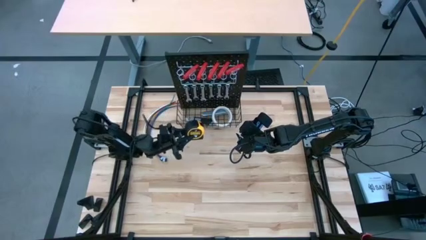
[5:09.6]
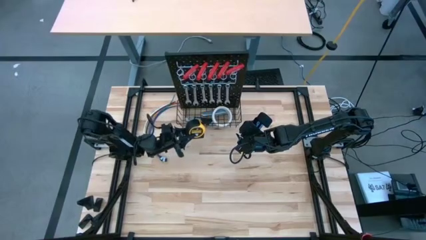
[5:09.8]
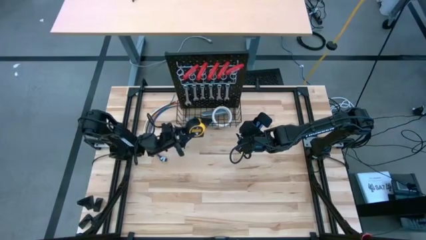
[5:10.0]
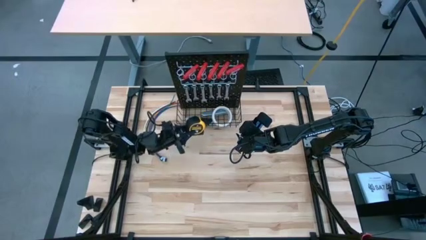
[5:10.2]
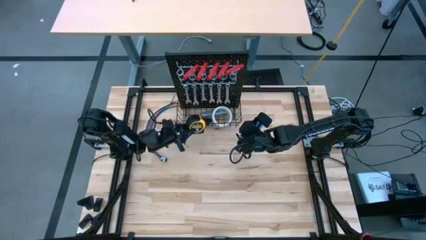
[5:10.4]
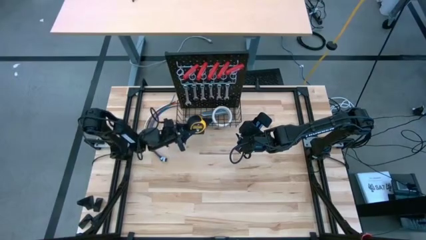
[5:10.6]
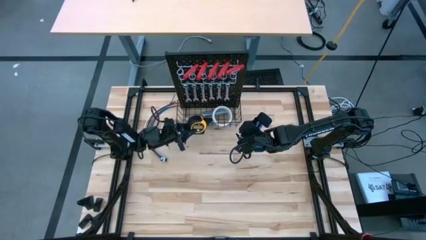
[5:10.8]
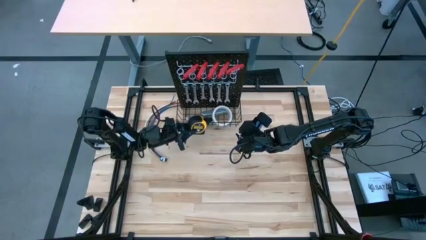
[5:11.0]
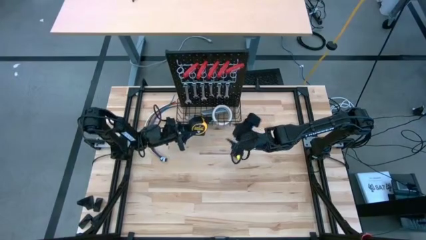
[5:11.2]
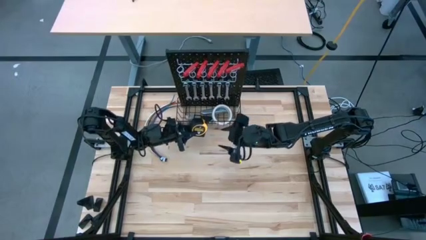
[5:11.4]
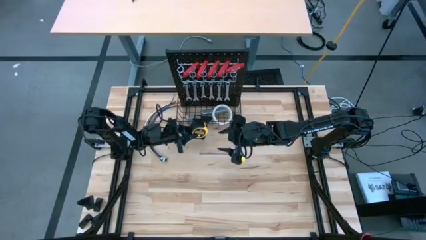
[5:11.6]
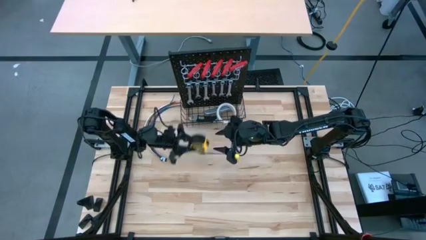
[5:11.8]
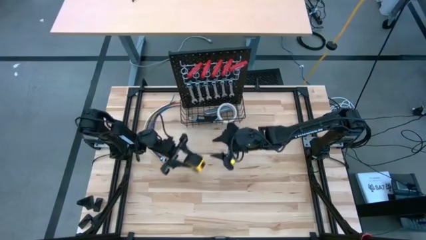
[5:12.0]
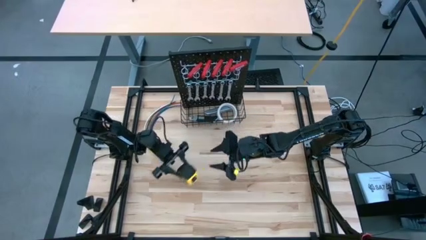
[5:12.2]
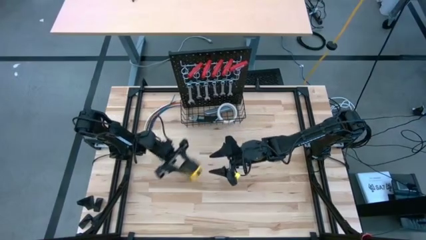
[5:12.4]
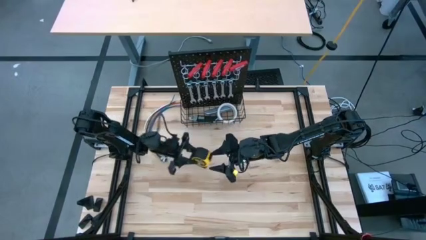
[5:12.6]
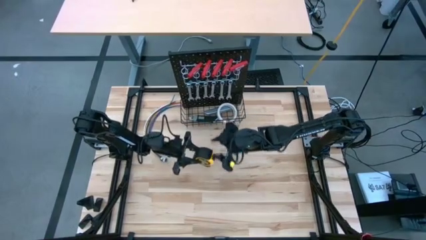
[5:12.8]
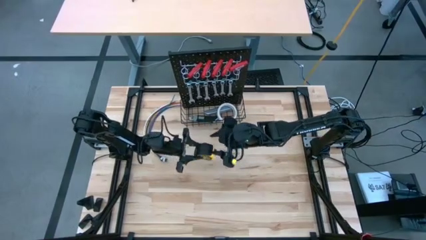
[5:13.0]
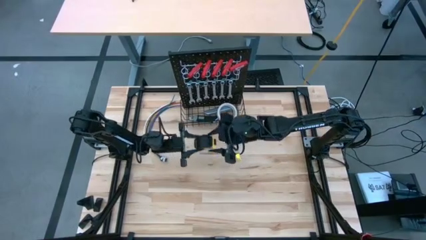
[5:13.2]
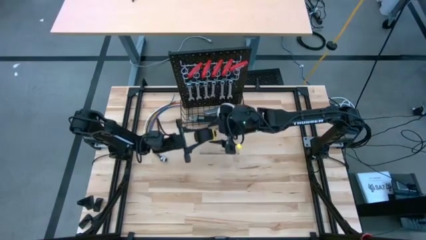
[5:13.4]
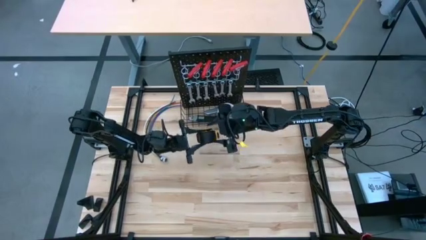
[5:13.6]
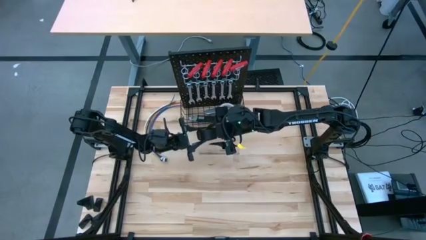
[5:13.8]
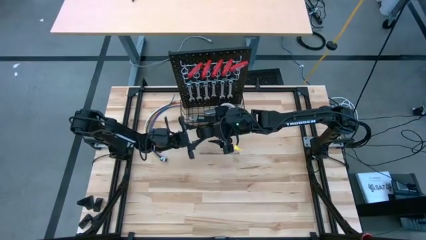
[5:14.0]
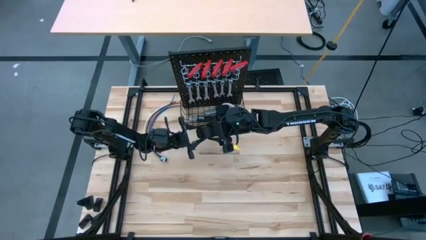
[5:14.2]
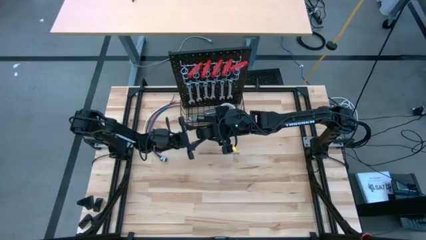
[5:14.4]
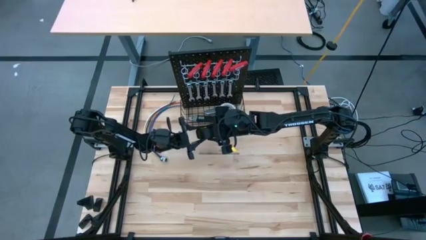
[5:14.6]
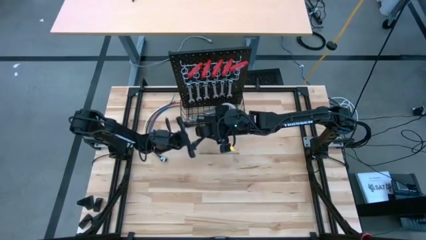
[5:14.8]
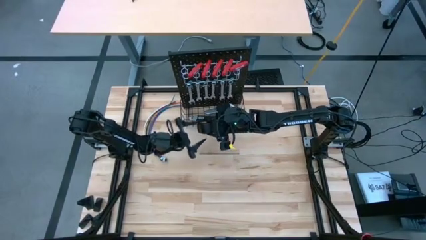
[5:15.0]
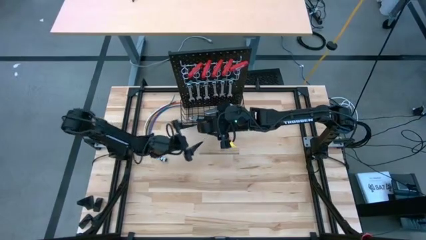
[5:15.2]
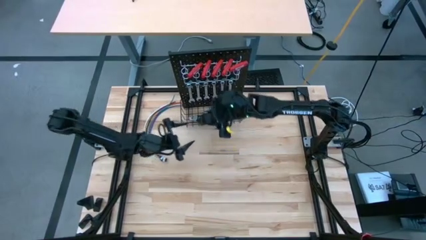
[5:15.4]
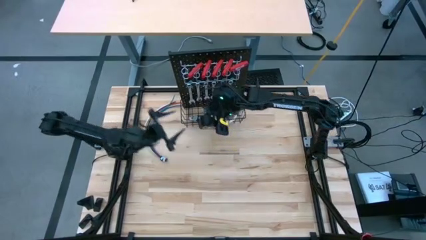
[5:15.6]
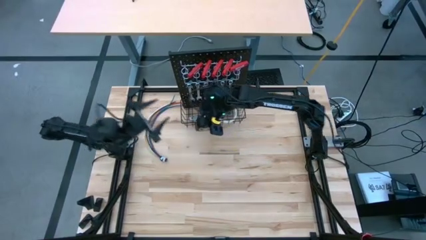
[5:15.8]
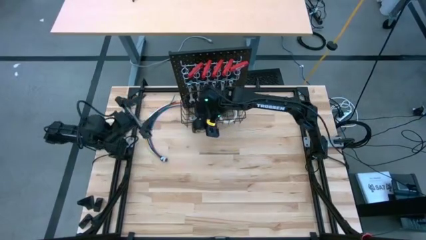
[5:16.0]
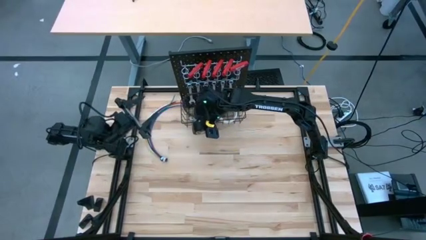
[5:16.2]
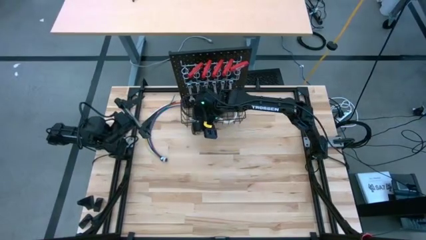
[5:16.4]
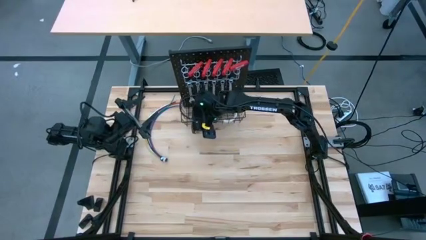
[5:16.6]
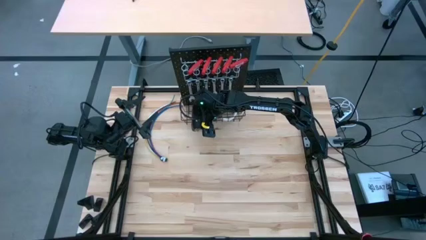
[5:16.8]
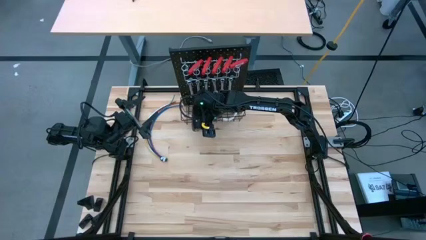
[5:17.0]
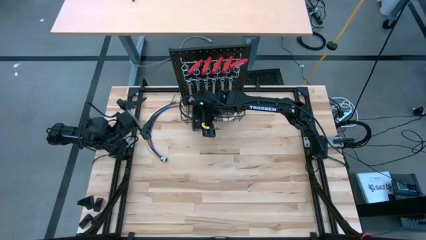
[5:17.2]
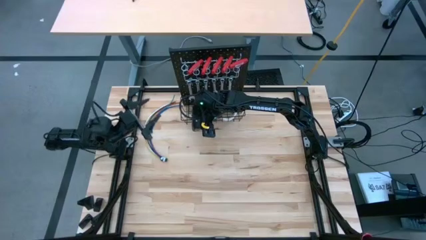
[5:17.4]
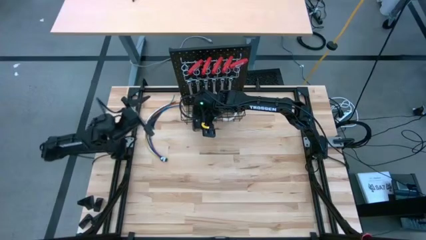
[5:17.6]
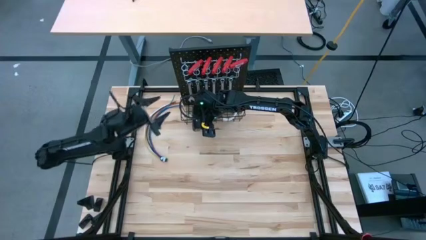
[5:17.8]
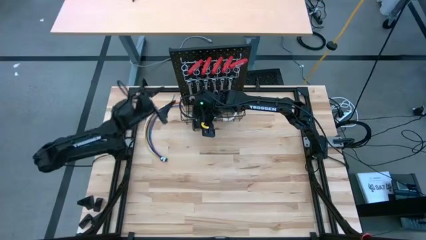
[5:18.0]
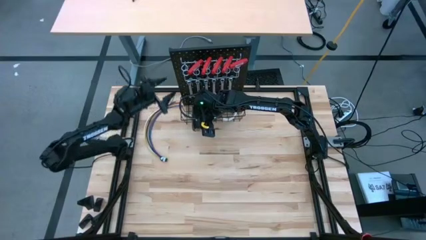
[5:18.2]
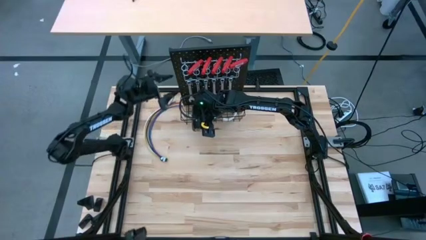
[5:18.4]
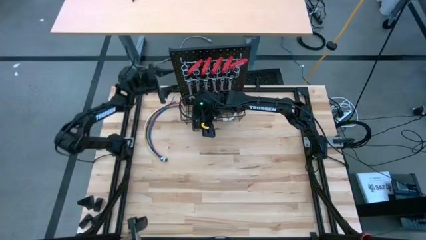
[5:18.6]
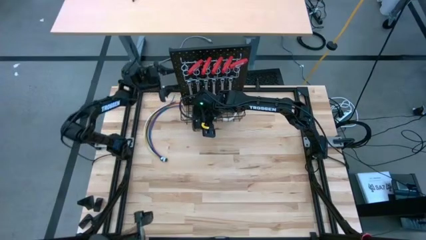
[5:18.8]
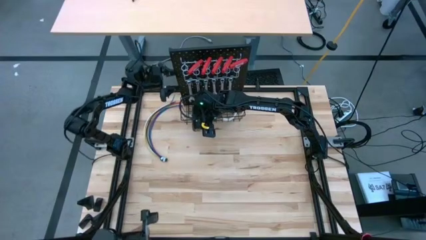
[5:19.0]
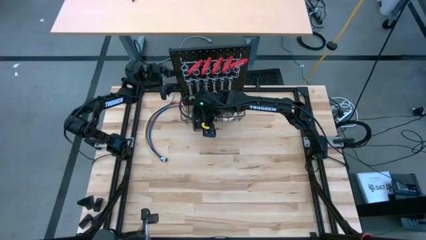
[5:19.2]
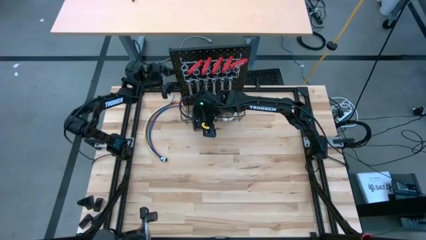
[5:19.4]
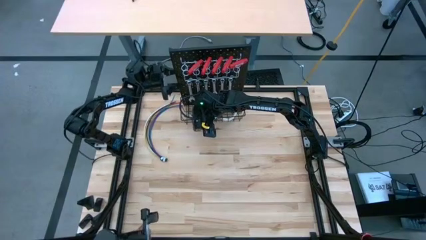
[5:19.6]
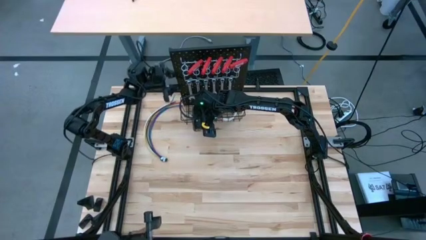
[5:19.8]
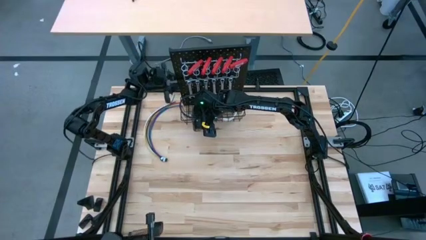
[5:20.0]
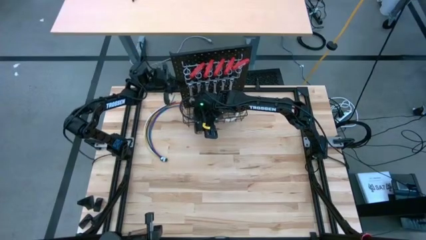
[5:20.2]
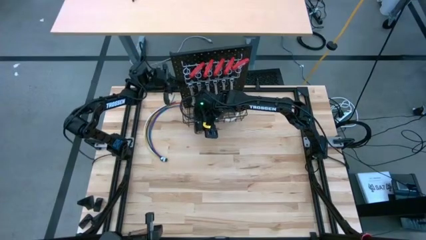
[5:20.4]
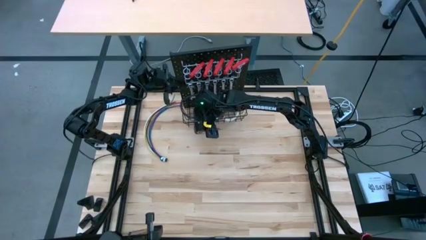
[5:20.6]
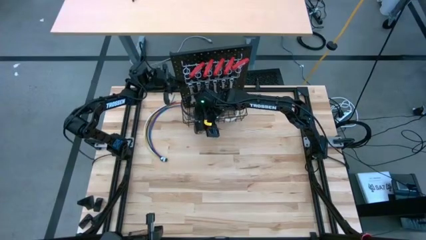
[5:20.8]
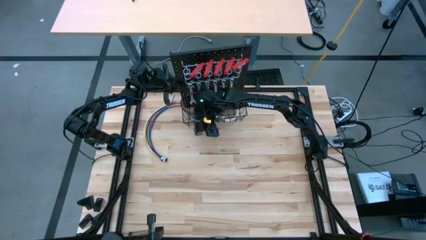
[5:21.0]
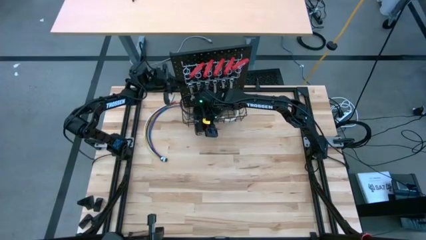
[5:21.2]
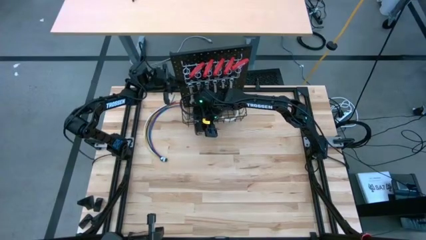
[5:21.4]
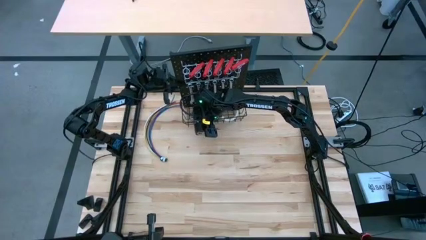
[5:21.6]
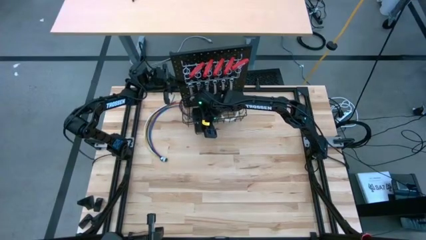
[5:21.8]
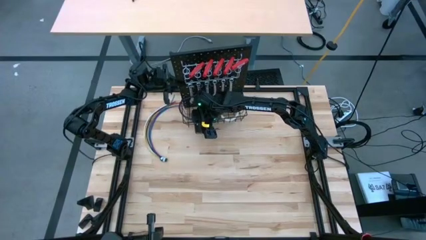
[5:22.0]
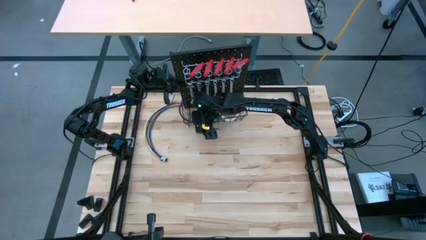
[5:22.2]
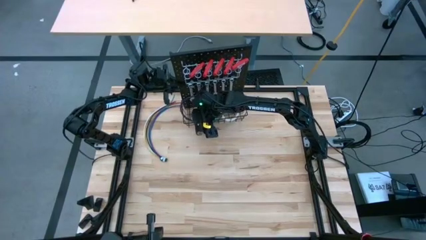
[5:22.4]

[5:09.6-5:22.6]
Task: Hang tools onto peg board
Hang the measuring tape on the peg board

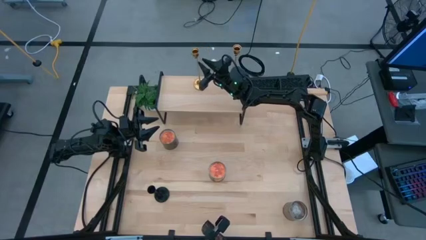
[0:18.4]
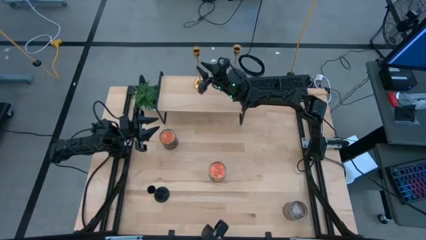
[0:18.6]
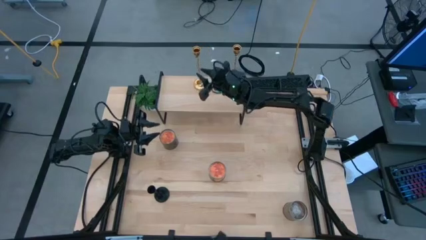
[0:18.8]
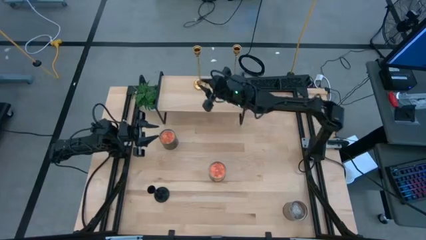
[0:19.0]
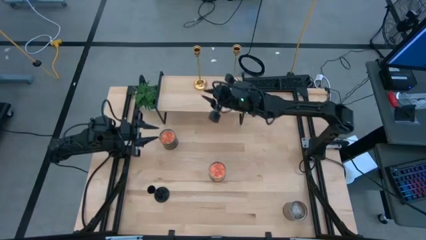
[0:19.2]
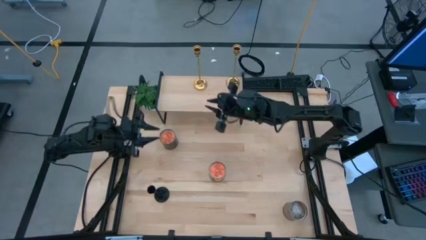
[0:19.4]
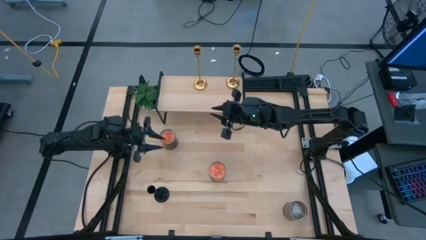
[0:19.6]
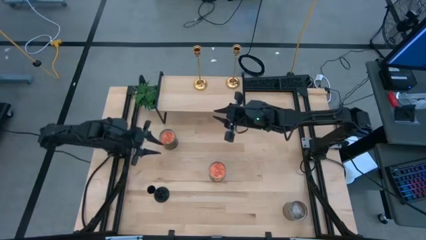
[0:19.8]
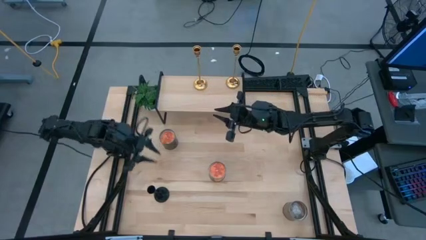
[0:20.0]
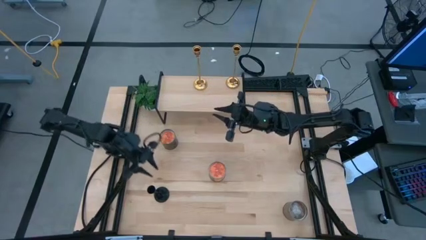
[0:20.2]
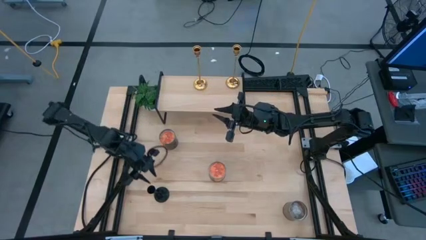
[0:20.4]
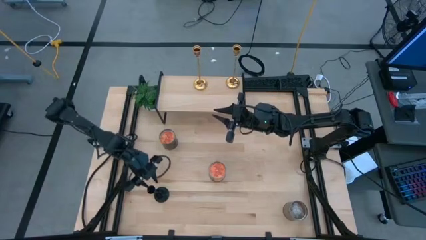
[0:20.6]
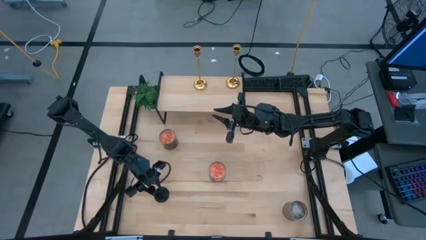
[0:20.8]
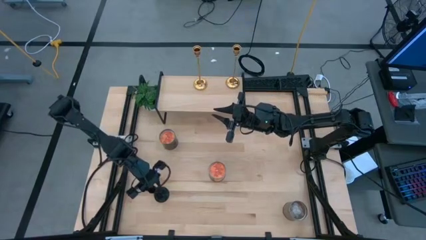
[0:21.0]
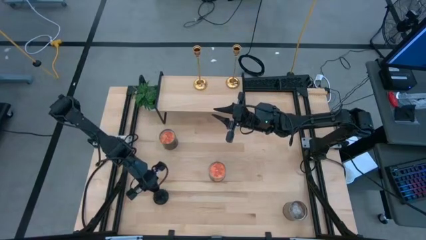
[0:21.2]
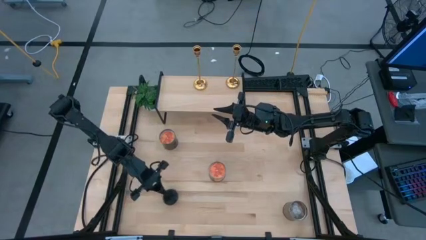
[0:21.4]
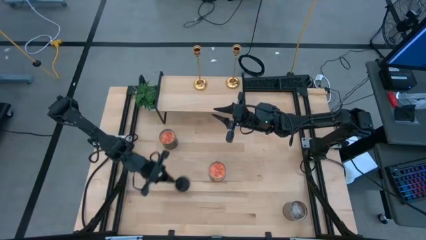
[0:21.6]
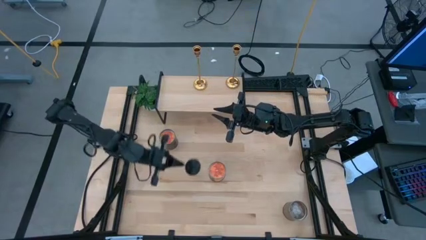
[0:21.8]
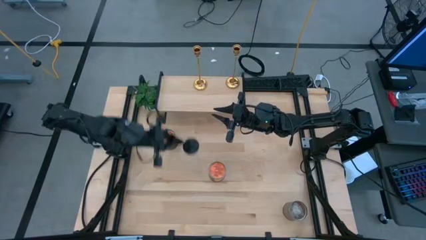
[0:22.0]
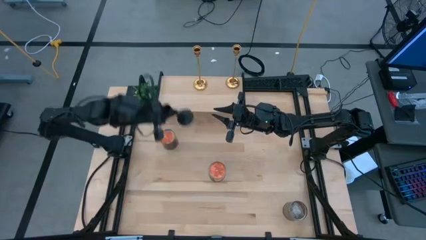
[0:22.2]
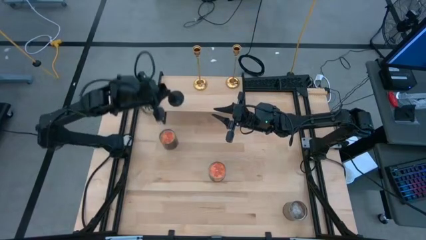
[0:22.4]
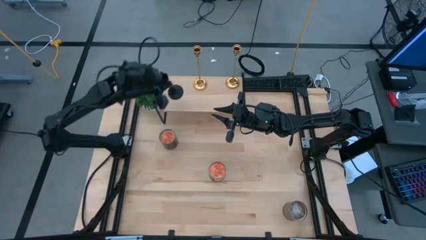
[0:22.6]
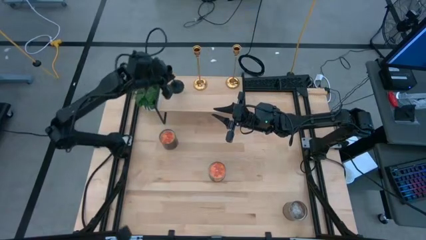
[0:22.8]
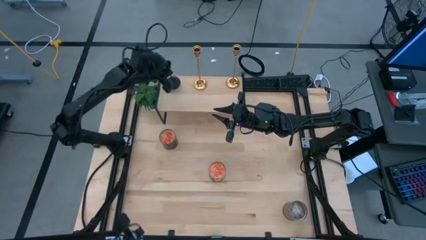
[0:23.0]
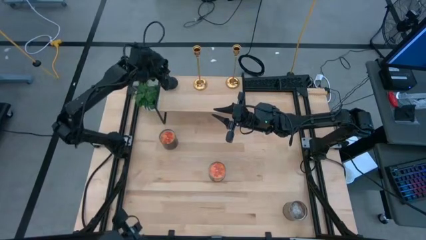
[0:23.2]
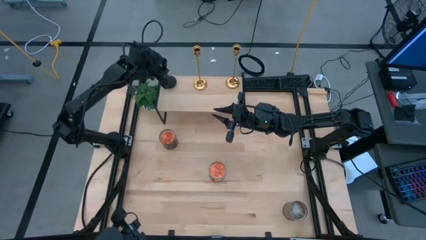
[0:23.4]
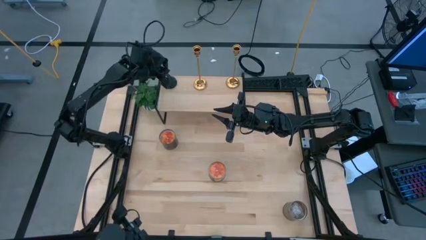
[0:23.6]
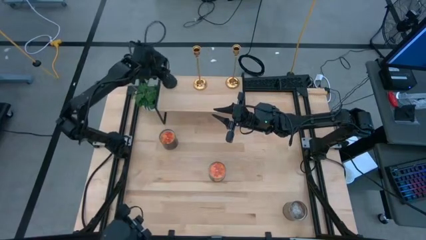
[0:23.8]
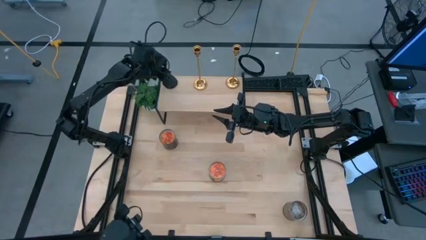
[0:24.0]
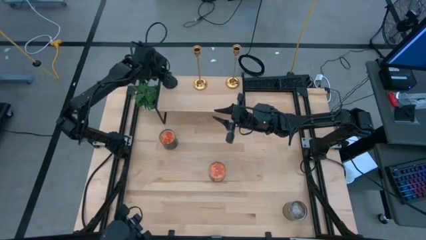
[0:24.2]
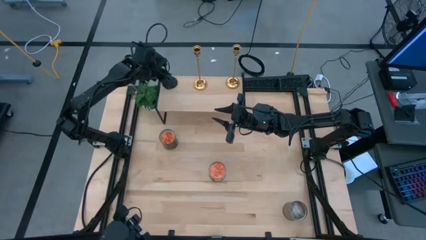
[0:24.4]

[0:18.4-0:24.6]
Task: Pick & Place candle stick holders
Put the black candle holder on the shelf
